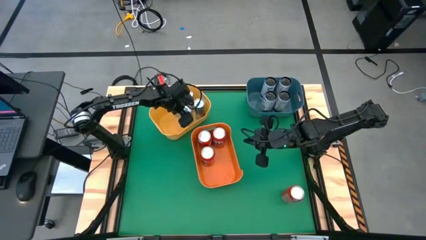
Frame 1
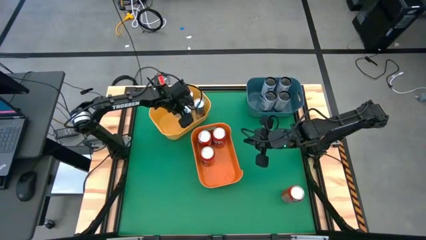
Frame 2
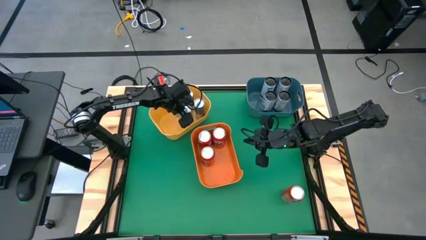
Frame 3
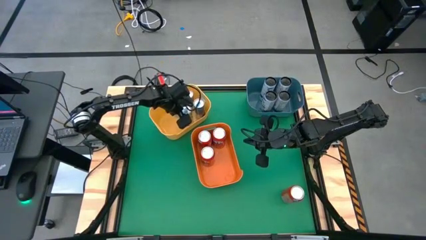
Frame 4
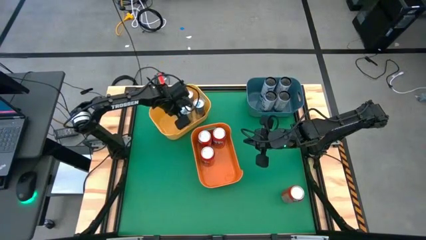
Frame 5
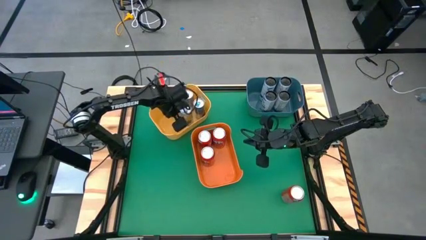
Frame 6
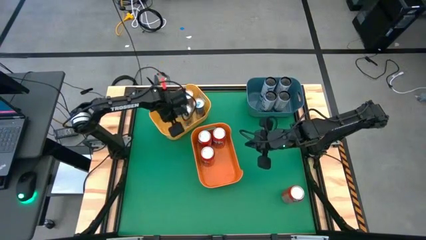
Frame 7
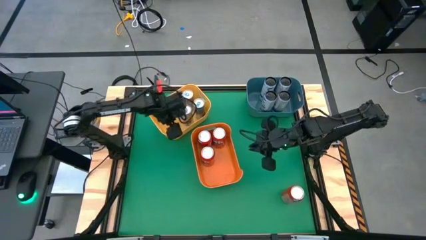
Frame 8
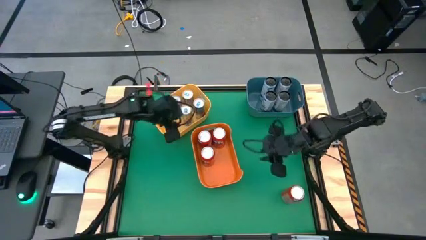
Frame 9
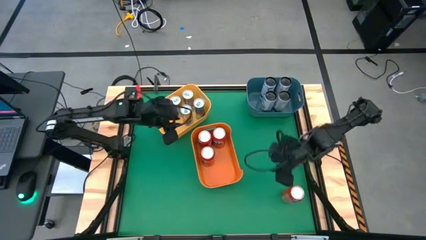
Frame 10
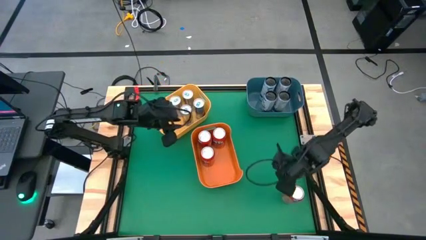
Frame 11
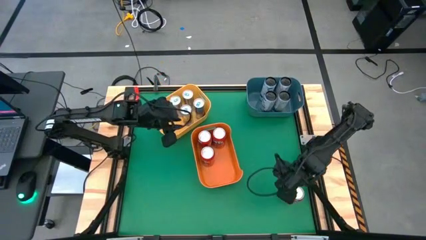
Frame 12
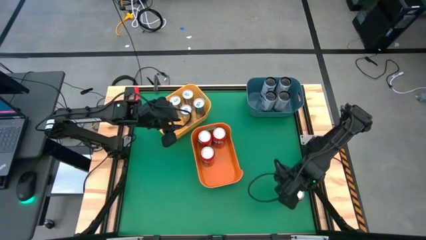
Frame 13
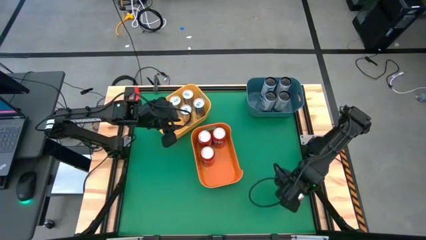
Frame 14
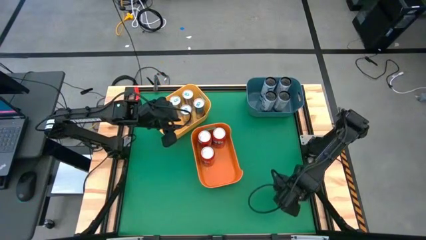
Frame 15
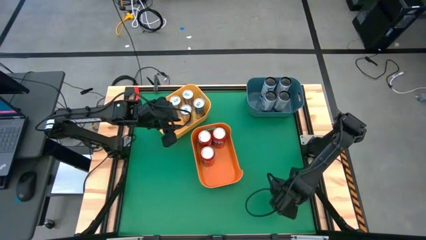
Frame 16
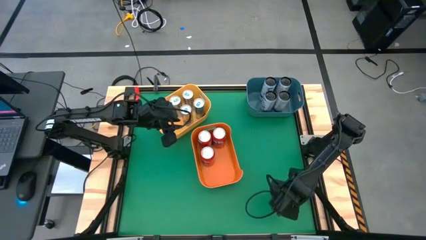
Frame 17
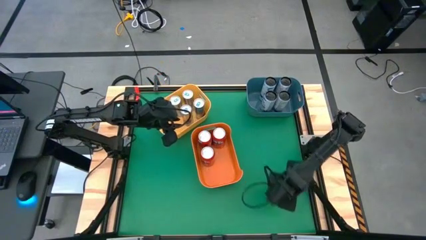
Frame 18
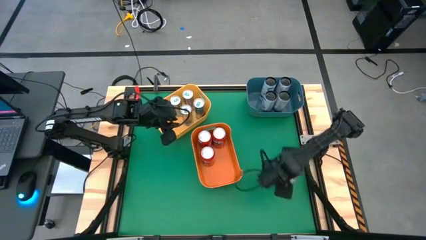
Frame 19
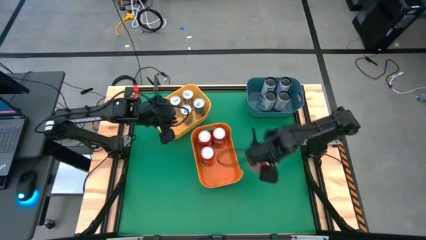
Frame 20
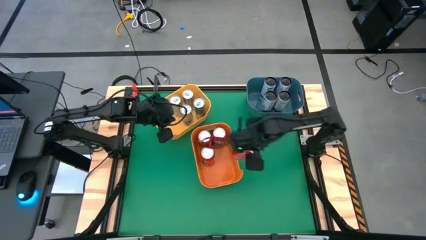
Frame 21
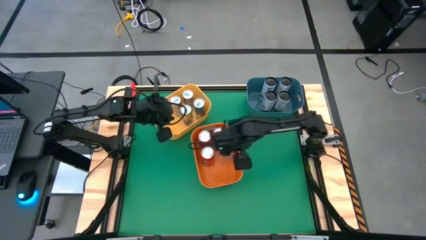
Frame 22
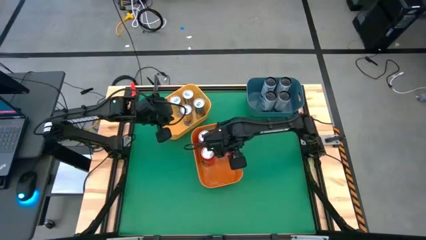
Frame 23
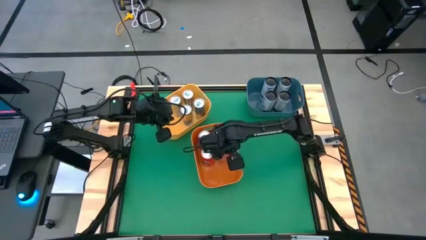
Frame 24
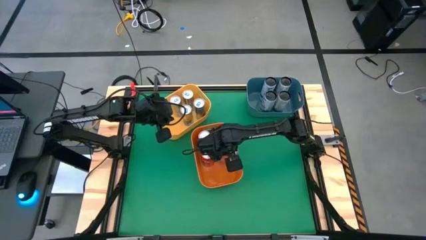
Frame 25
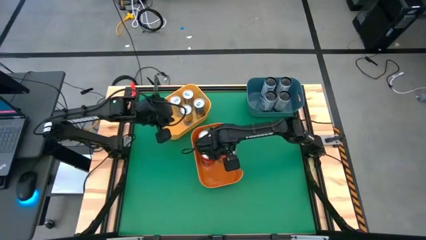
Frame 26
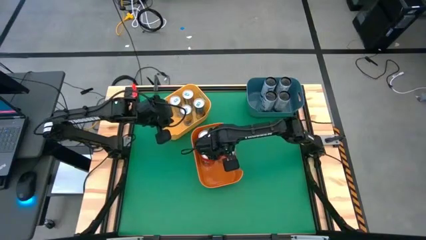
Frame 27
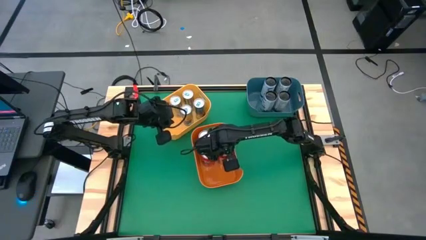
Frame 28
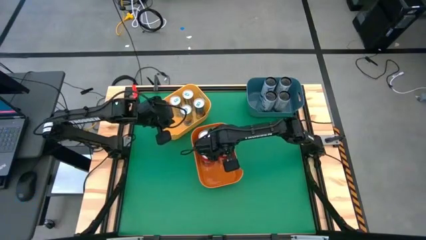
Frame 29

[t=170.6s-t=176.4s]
Task: Sort soda cans
Put the orange soda can into the orange bin

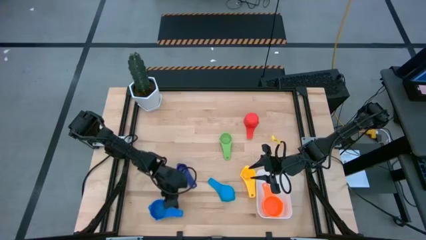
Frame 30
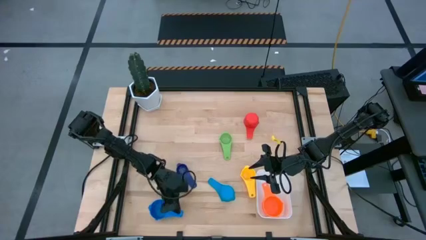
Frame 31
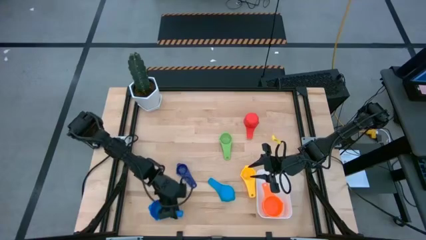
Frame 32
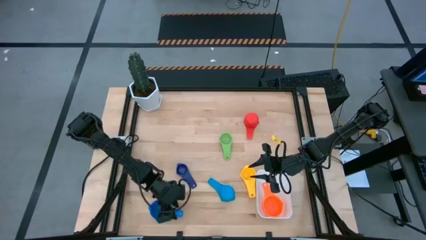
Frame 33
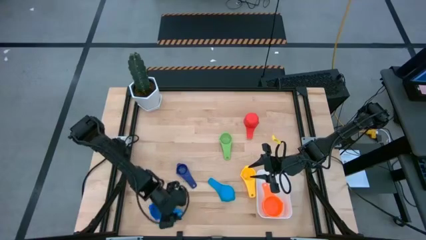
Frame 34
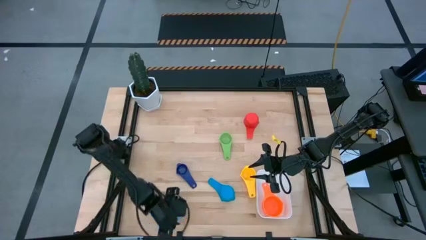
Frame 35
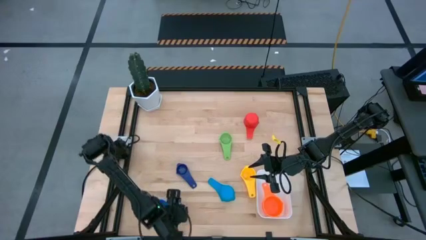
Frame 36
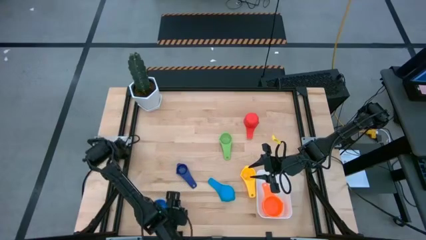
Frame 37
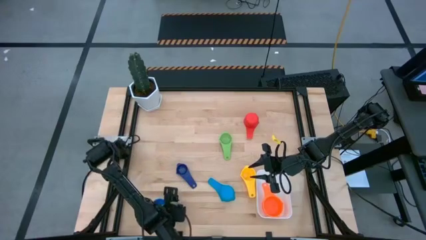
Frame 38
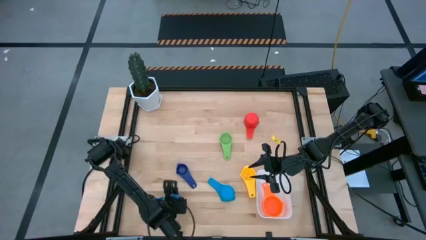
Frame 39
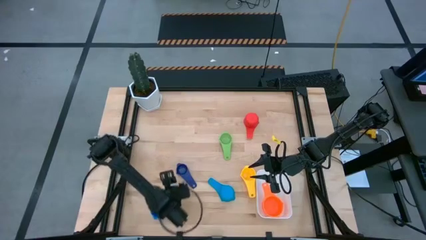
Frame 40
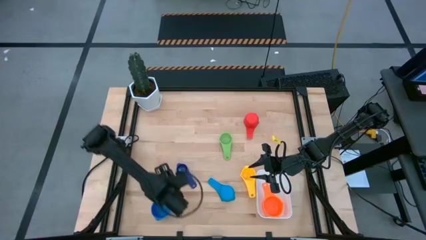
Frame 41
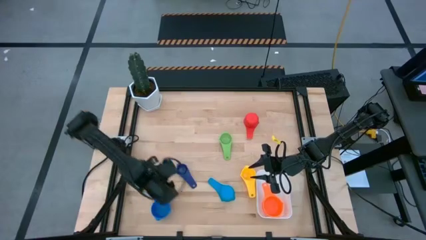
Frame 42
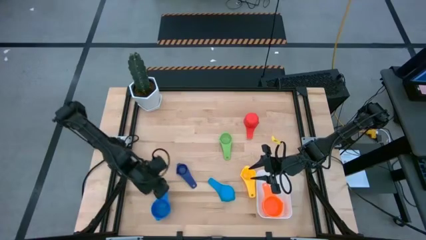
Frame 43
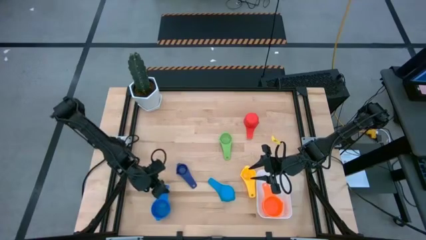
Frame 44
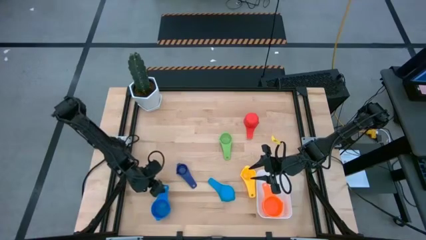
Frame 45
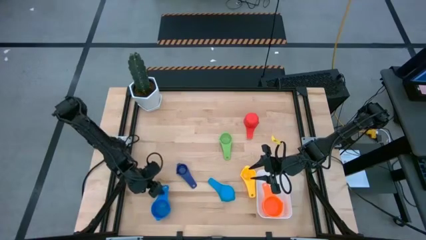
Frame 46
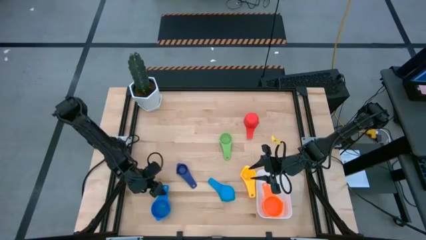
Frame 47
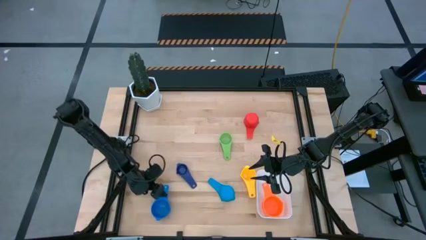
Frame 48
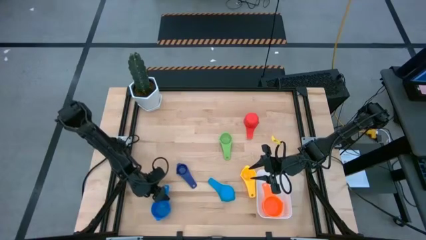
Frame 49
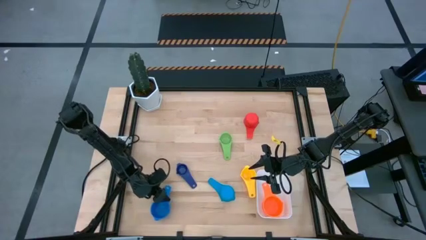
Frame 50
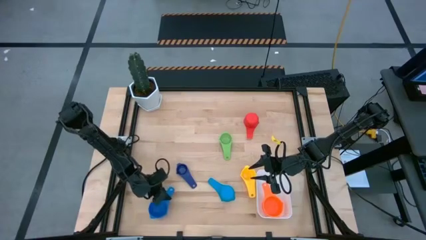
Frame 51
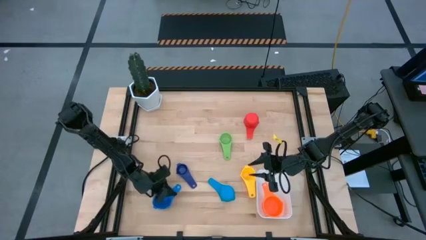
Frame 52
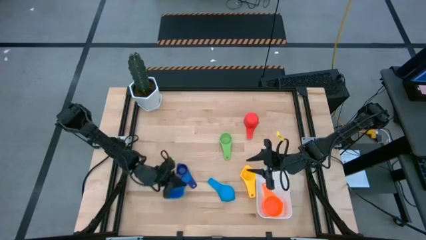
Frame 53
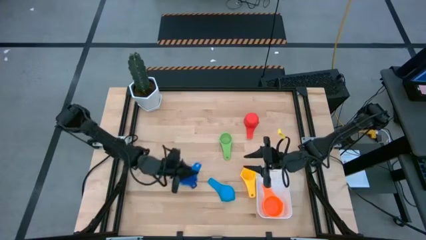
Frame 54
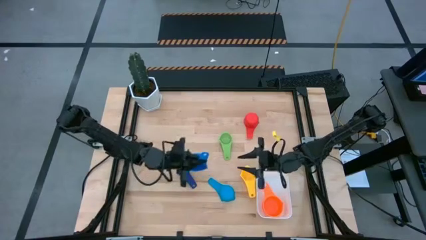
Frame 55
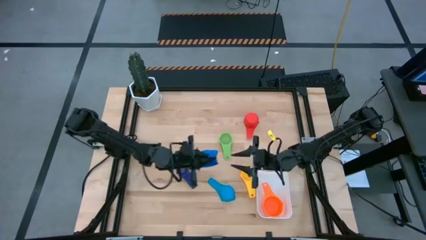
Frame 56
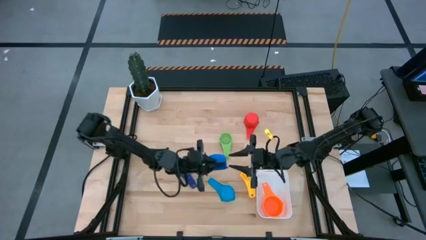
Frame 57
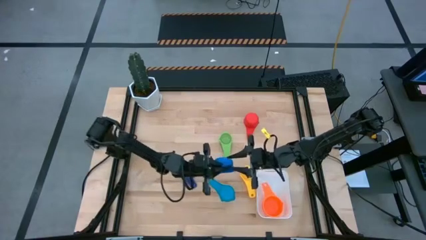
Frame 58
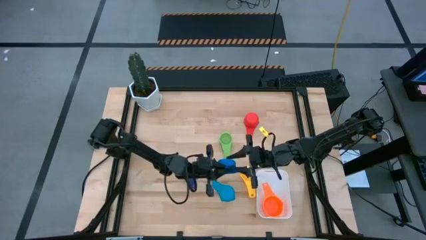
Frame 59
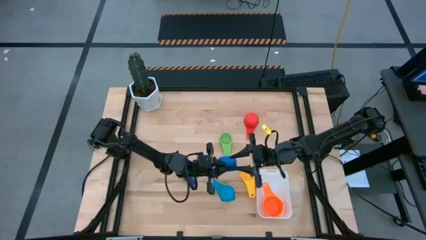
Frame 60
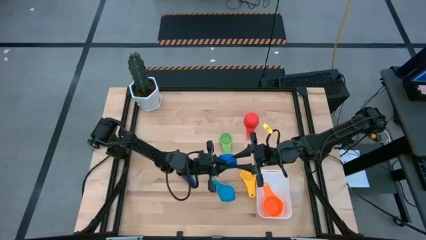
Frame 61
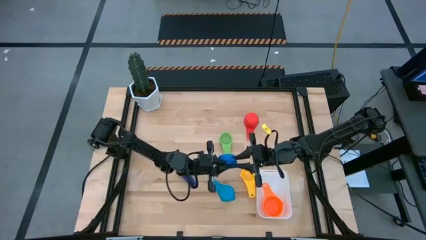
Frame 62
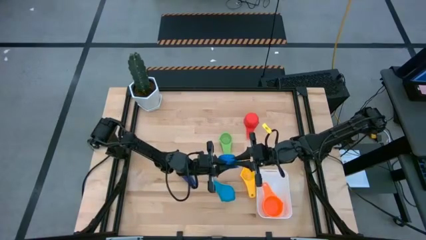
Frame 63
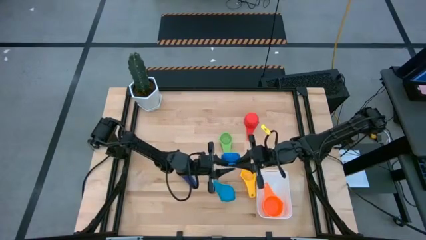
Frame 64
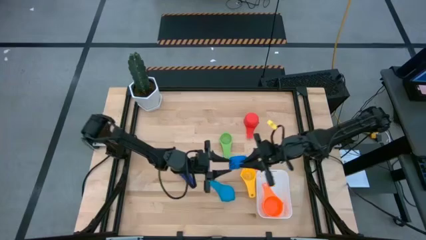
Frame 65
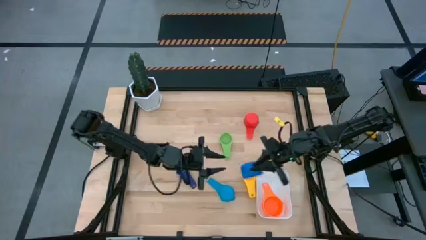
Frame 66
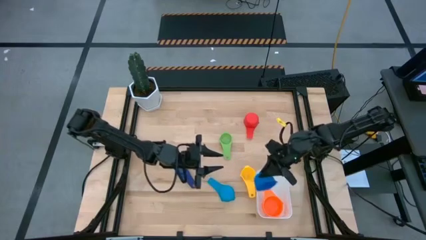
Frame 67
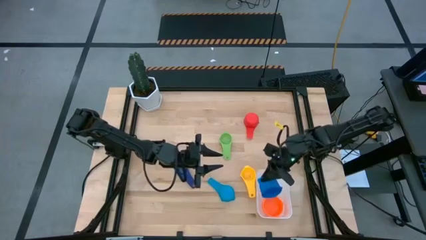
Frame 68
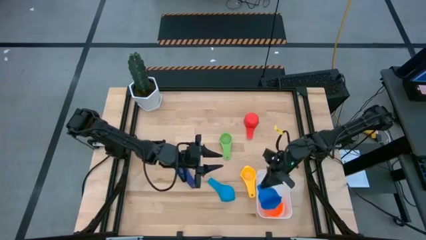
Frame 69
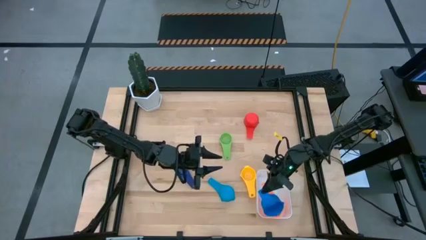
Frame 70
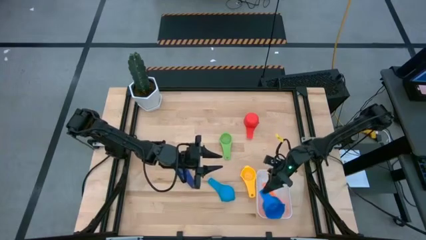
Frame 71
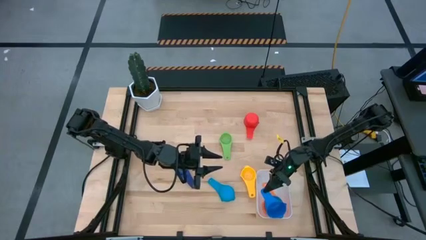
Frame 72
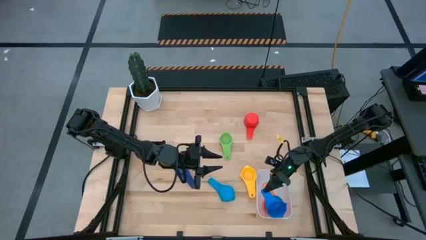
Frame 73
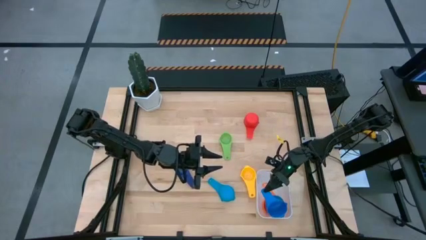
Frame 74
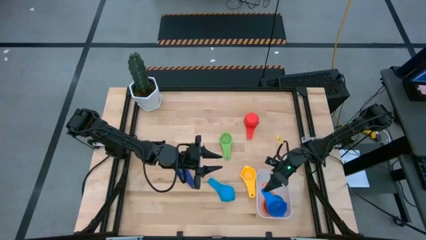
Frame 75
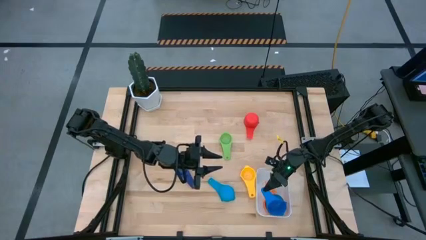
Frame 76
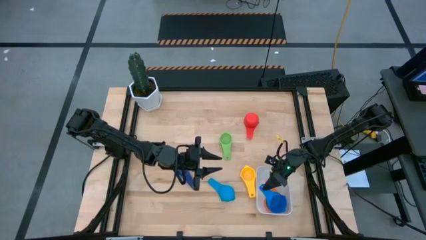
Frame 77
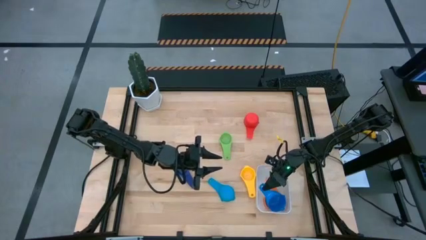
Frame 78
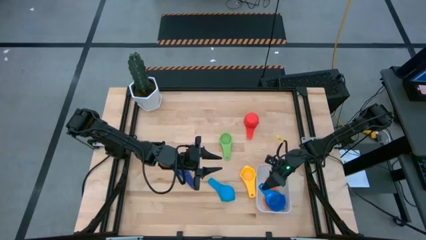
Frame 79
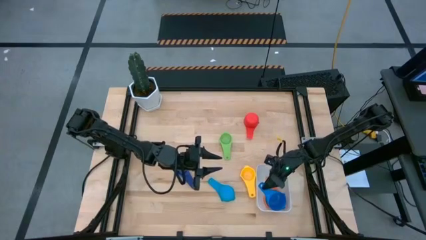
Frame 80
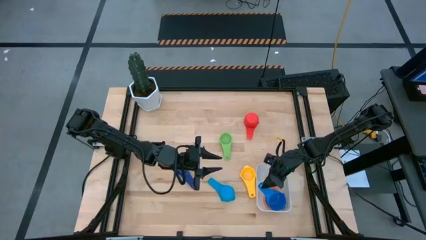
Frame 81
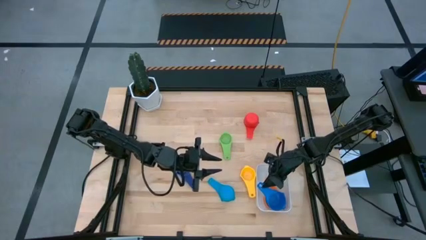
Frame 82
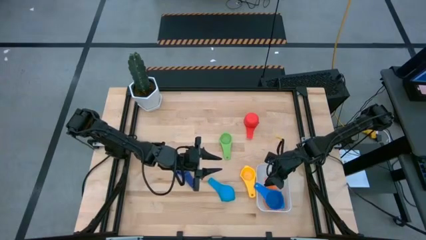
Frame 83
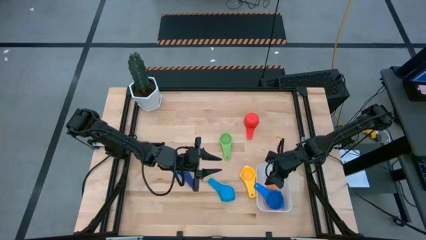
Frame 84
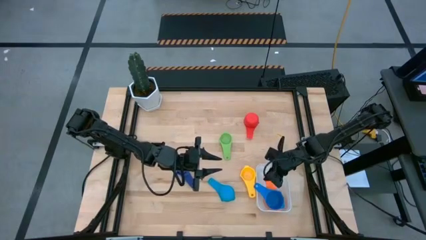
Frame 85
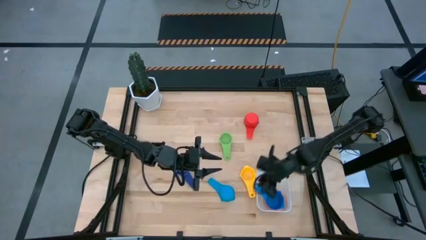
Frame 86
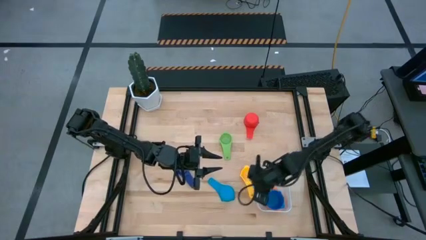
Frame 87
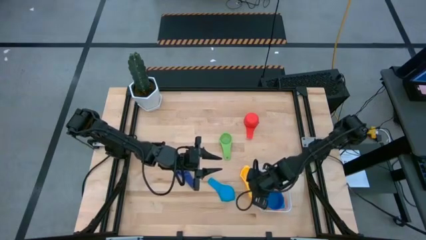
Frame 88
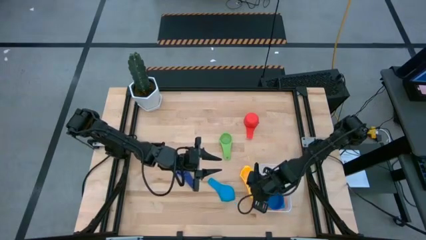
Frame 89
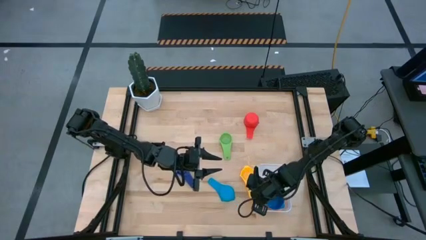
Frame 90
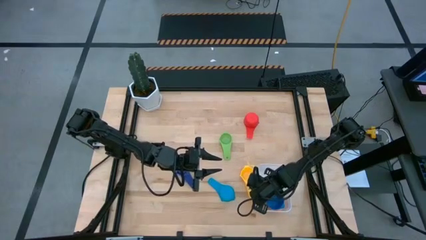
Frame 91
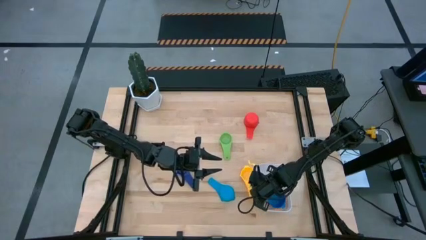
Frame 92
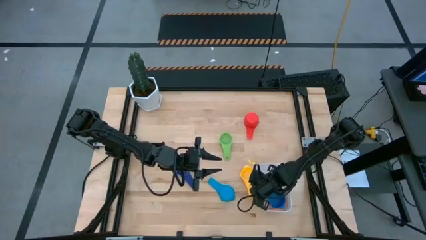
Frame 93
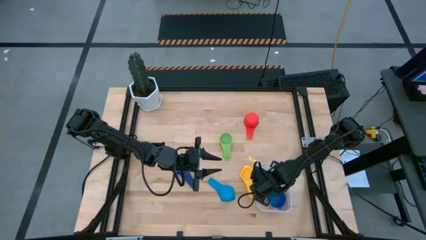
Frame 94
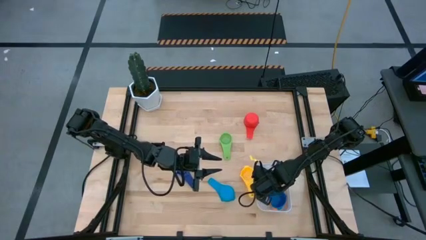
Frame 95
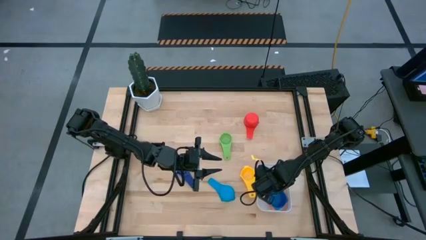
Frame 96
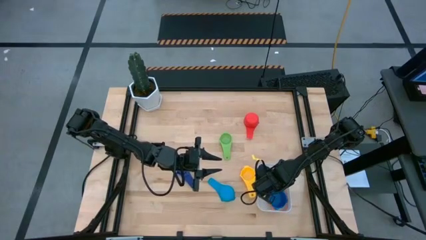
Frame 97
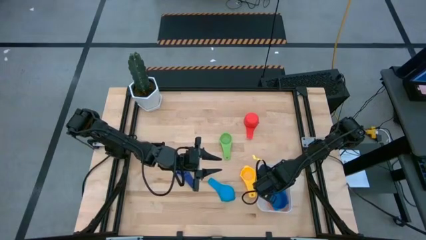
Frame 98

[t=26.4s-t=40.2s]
Task: Nest measuring cups in basket
Stack the blue measuring cup on top of the orange measuring cup into the white bin
